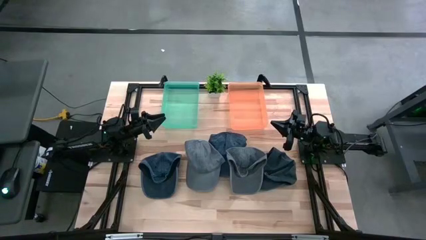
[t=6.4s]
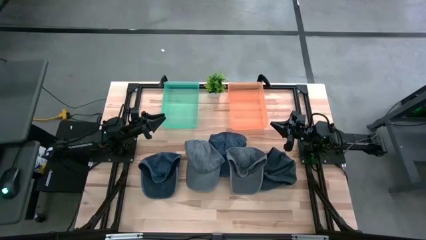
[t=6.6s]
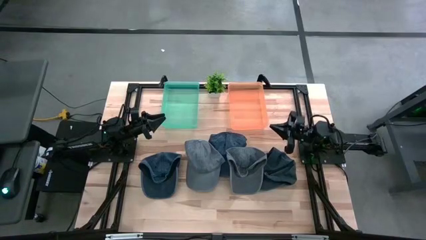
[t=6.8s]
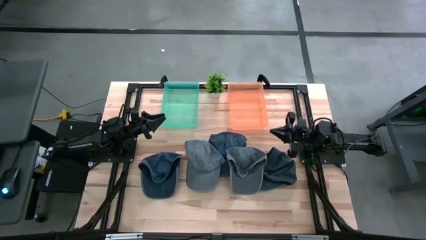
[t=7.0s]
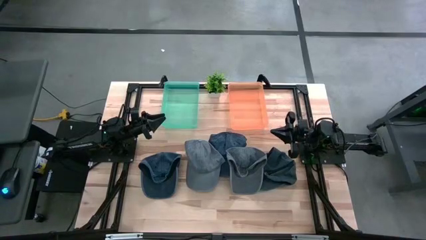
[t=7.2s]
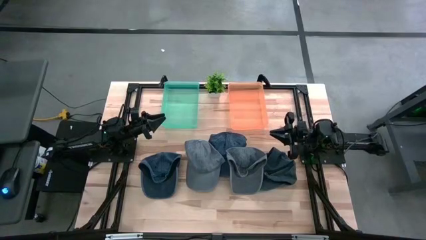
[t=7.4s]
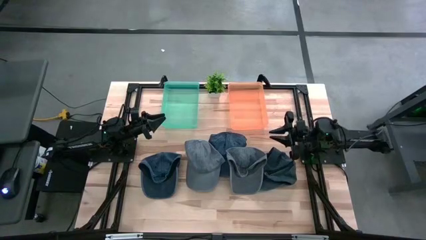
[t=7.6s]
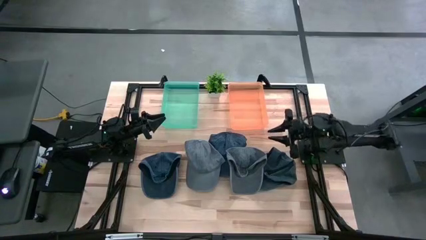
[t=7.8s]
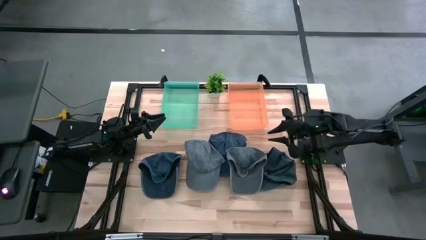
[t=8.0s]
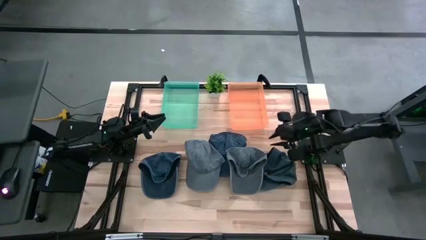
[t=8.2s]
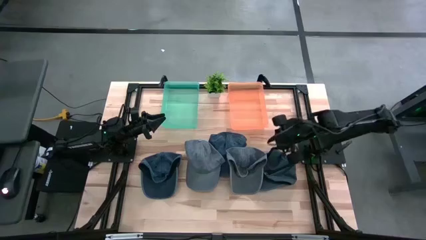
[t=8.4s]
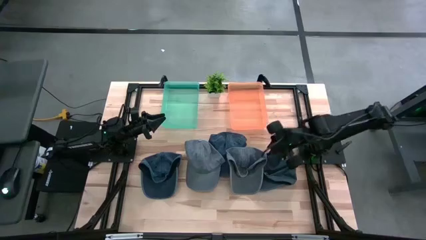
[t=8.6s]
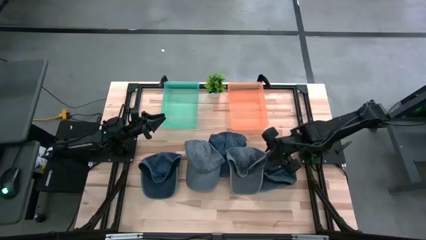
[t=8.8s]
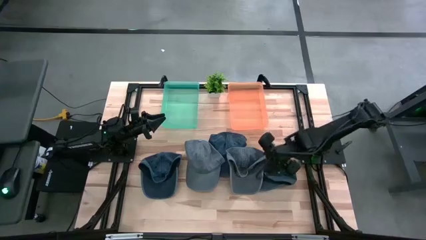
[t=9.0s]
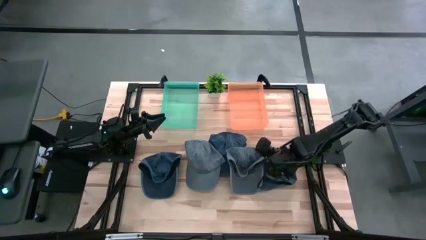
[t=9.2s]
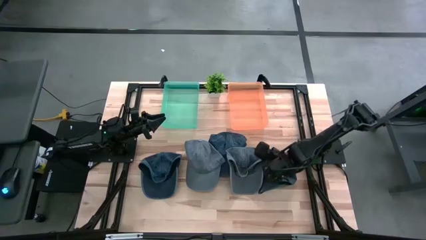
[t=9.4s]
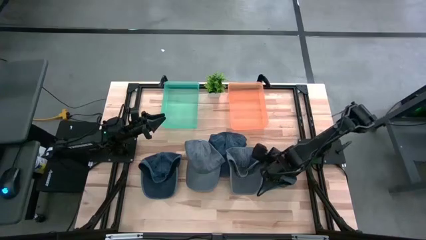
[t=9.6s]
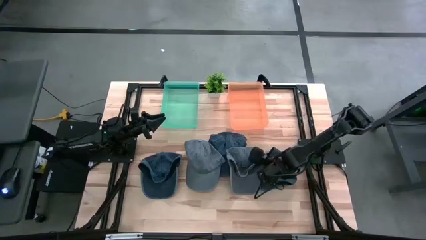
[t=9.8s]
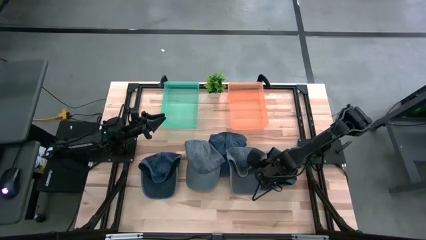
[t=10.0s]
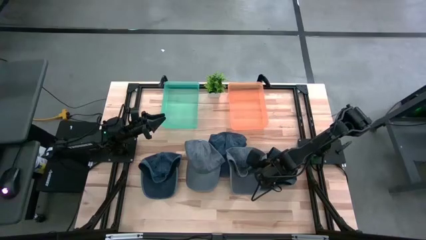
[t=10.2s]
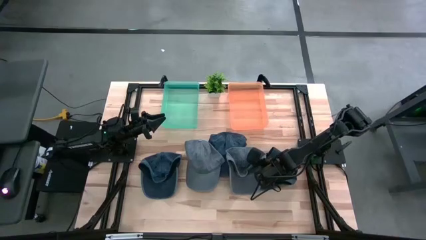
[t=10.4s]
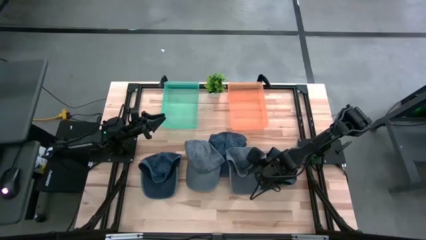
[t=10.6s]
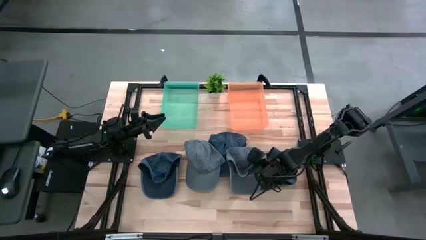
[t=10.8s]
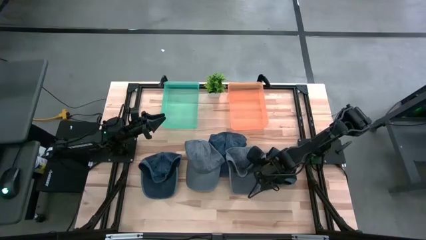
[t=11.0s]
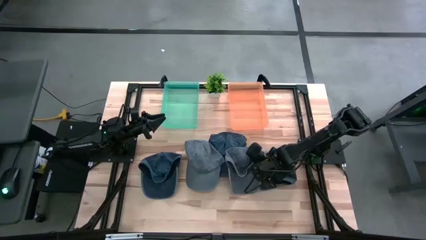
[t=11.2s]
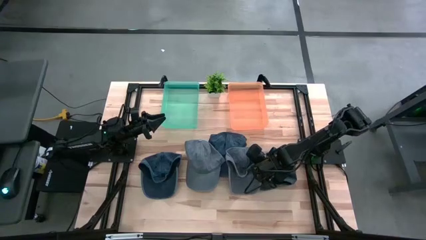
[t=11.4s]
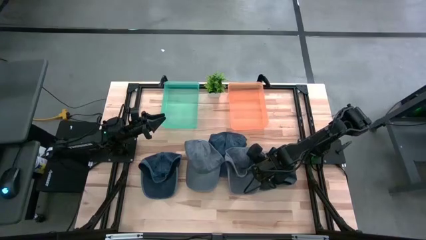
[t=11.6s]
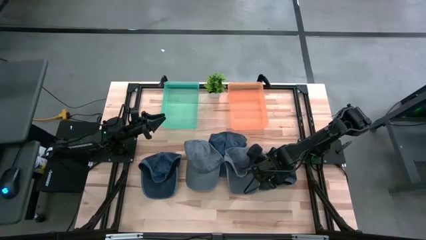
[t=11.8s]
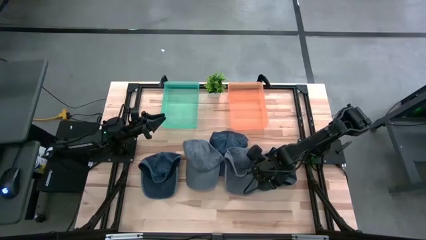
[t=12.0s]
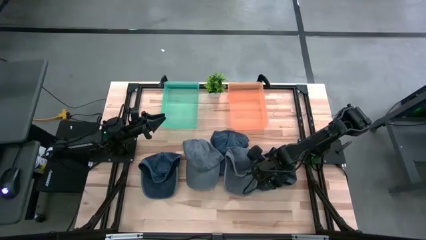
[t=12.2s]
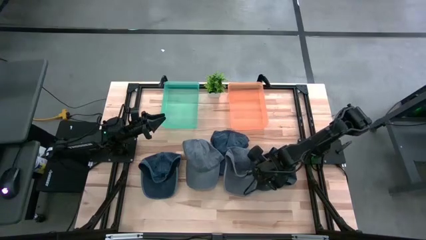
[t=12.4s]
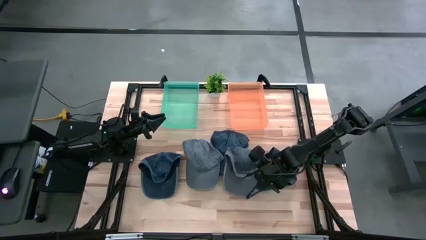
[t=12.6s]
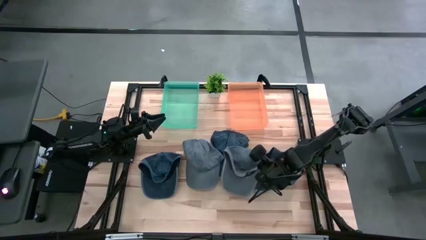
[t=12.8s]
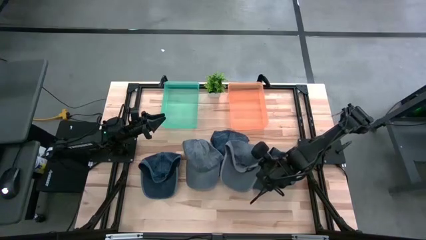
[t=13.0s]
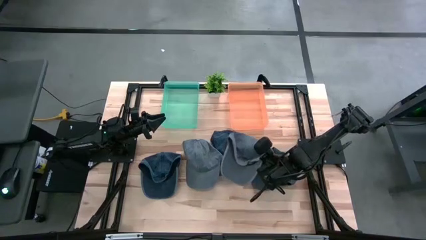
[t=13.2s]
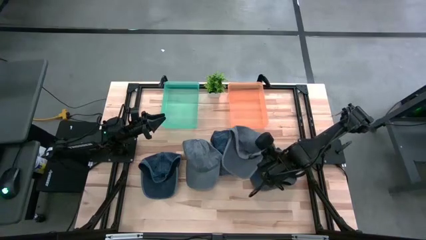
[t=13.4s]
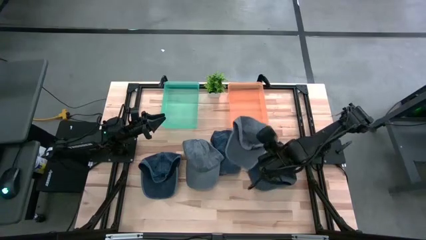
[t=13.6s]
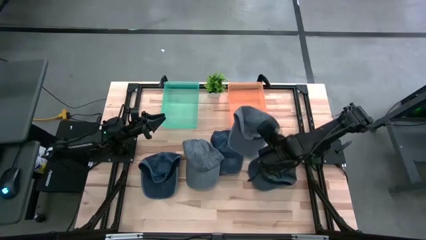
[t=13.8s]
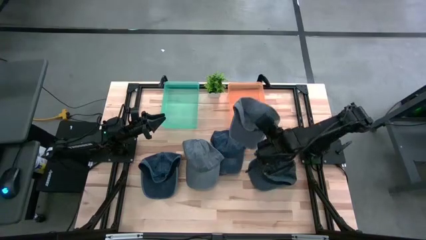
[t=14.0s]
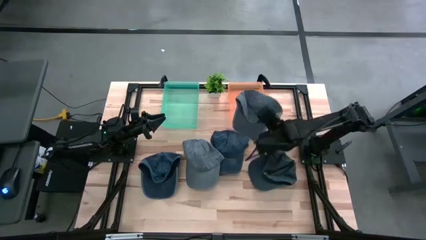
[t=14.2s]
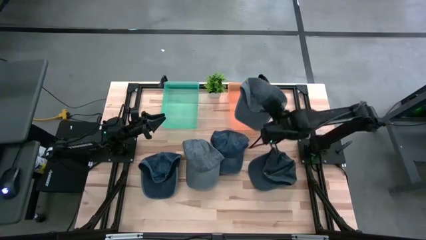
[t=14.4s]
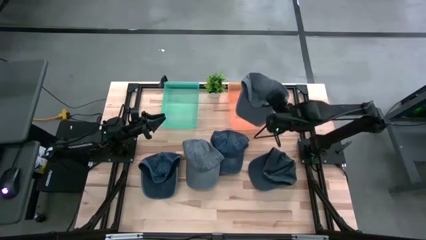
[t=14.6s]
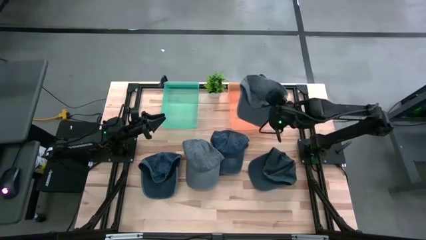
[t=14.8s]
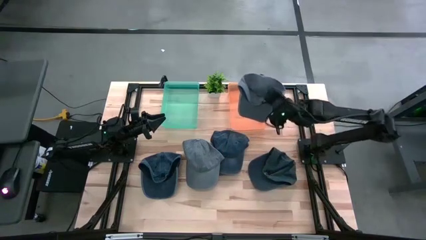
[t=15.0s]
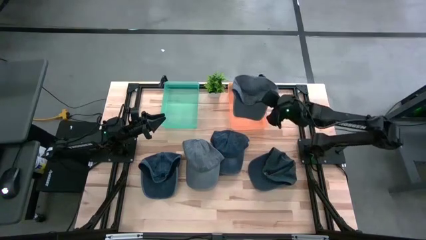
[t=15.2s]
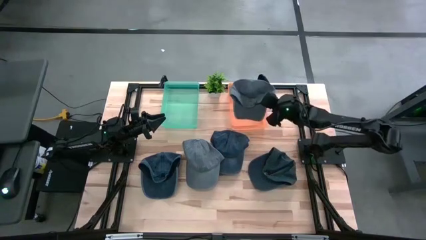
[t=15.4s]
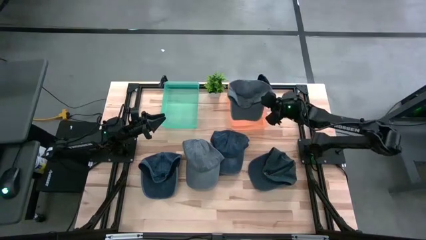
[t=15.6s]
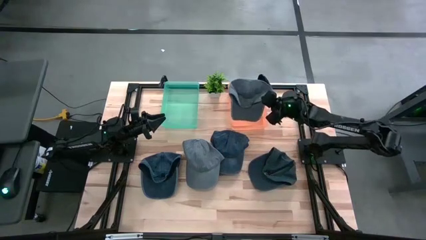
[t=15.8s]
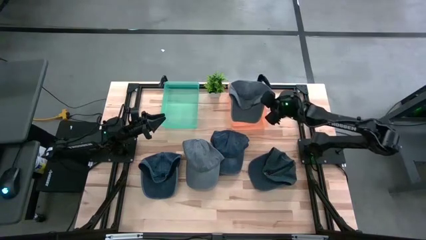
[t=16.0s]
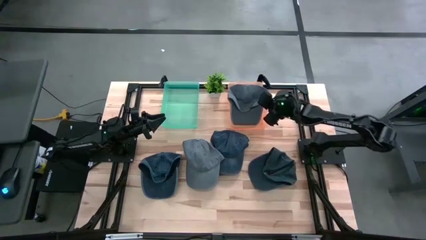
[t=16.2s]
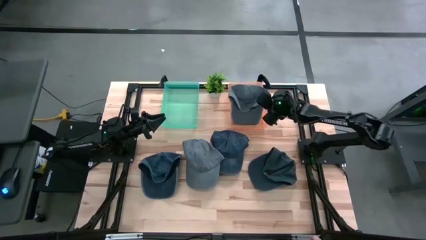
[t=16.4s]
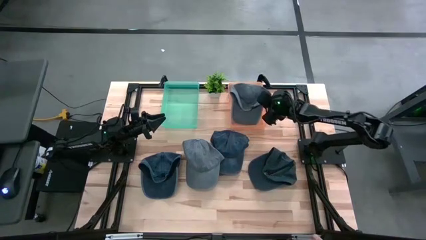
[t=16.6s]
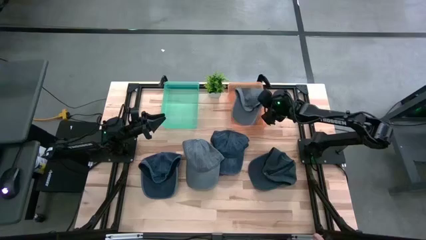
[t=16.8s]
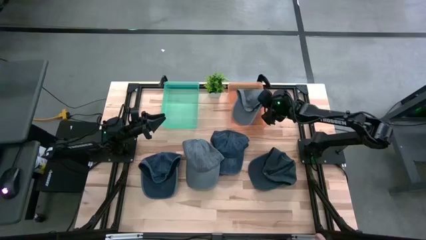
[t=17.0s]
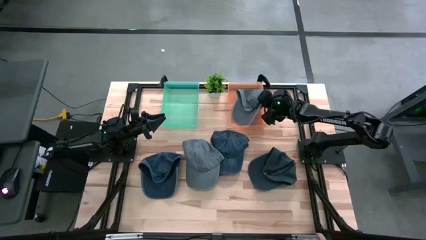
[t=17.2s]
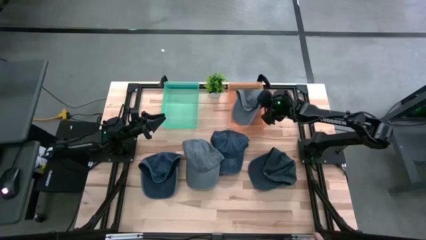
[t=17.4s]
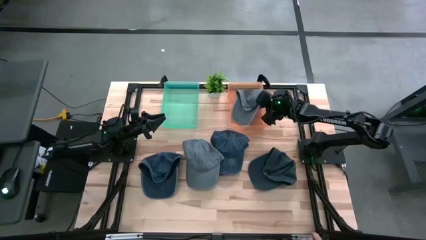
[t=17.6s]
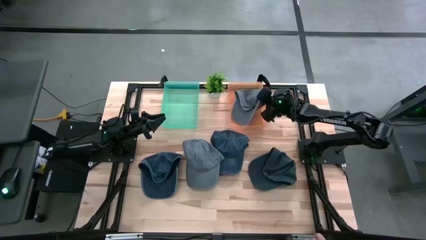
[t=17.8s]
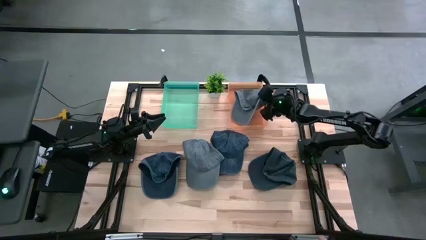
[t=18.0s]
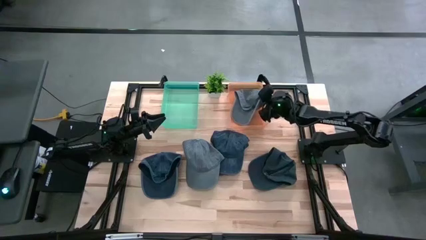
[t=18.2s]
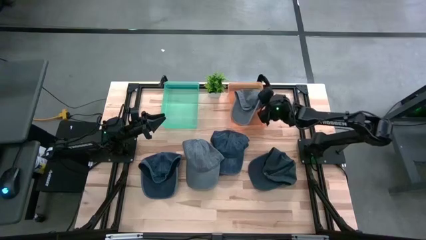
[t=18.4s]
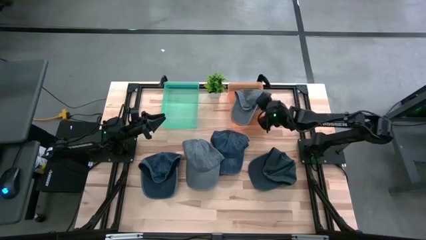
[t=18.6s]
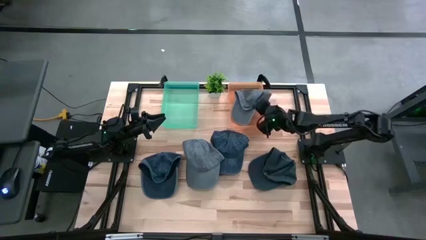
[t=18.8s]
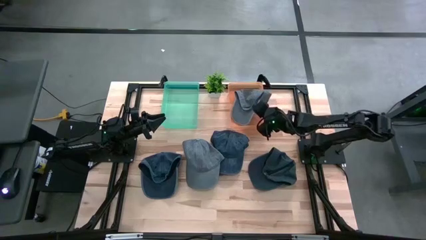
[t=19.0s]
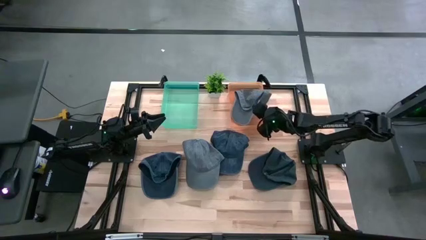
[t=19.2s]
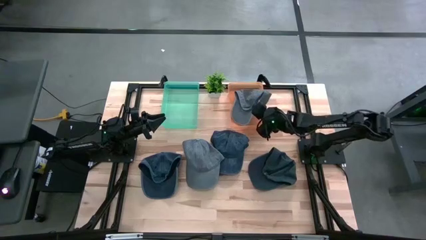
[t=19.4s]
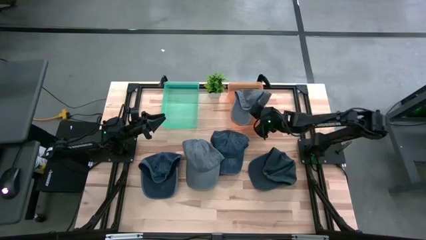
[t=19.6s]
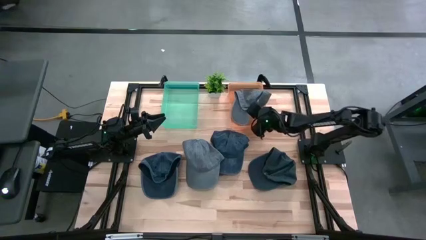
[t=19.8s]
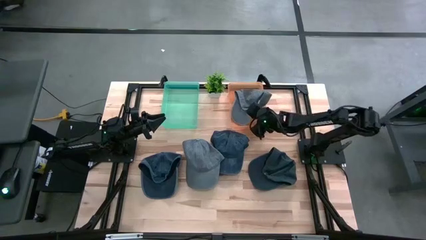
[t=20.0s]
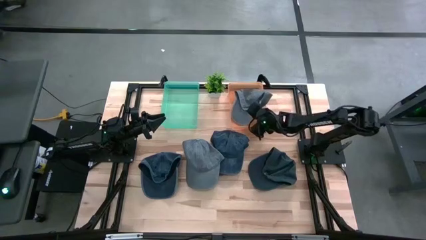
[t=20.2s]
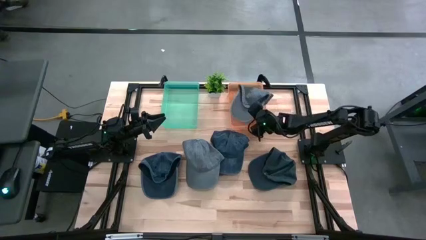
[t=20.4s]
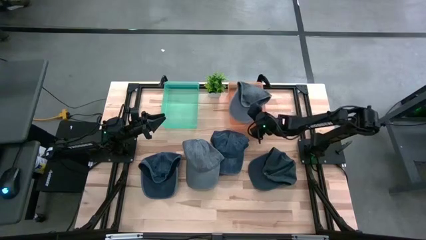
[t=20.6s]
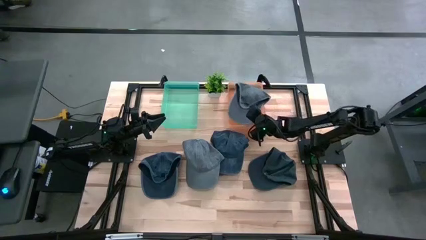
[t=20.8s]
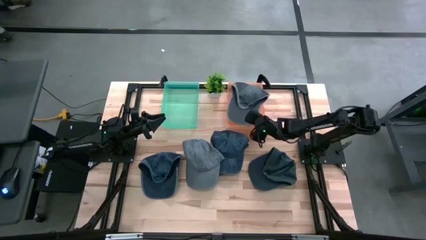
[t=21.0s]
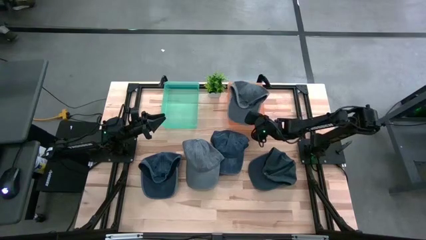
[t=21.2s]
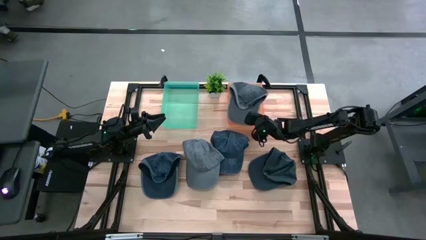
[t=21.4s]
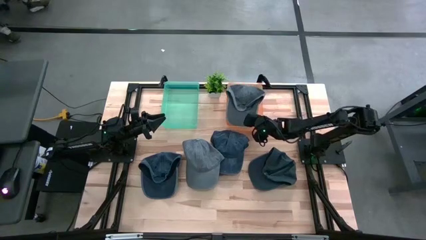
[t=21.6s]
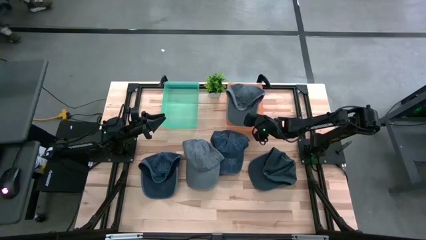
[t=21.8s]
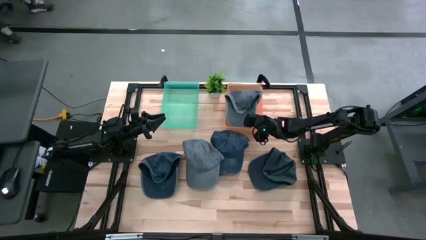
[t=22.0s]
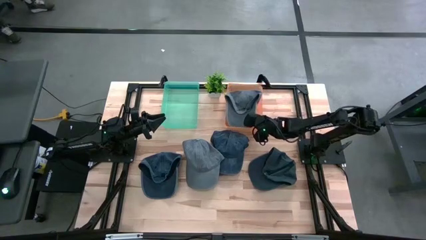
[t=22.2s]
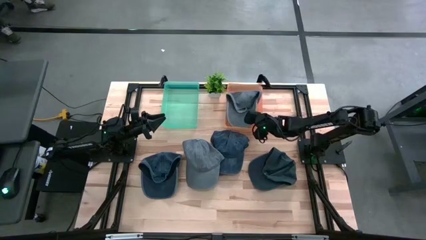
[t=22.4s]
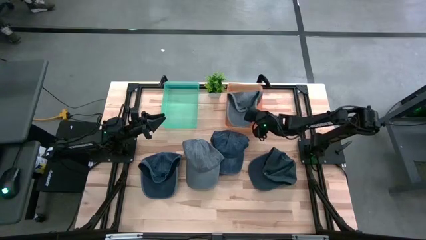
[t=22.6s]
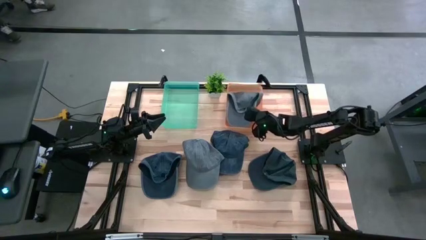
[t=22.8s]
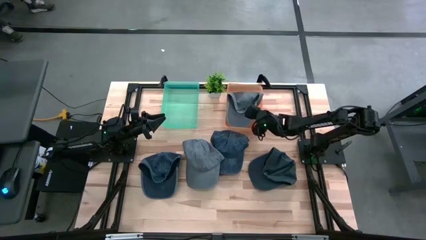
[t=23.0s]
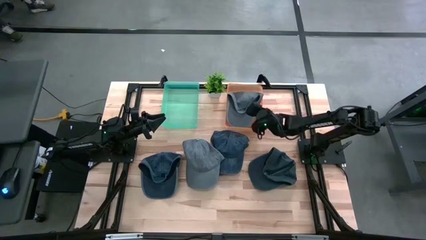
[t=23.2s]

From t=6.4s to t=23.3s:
Task: Pick & Place hat
Put the right light gray cap into the orange bin
